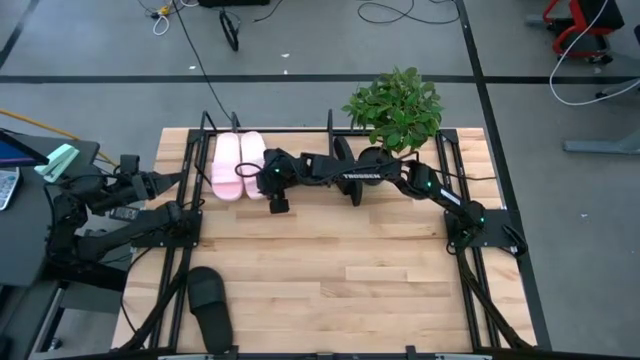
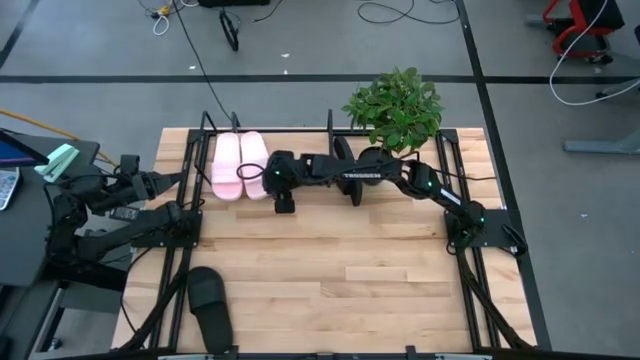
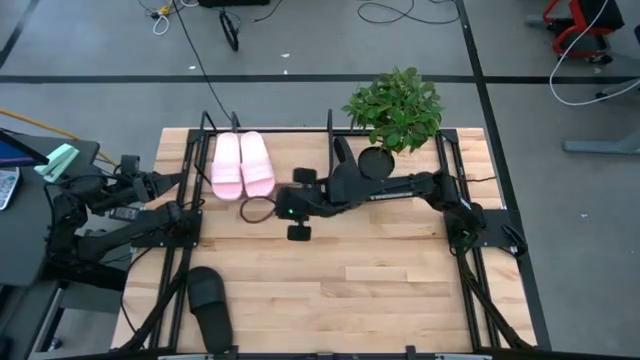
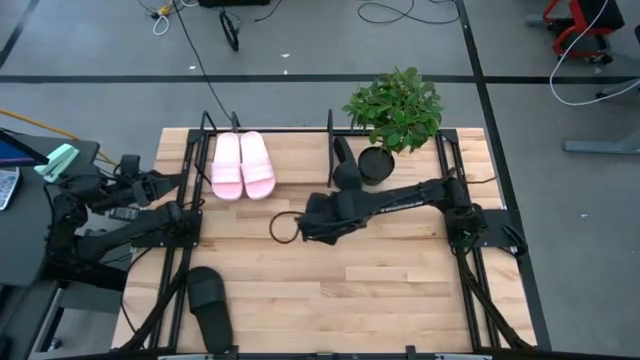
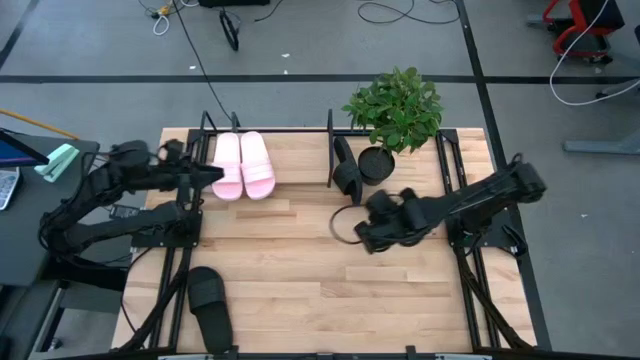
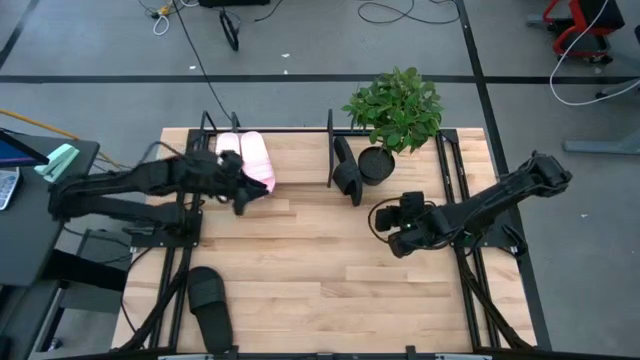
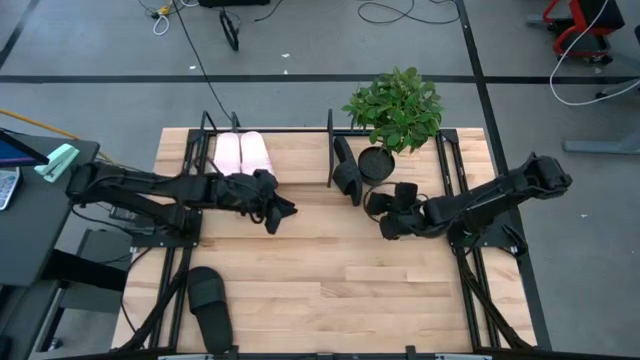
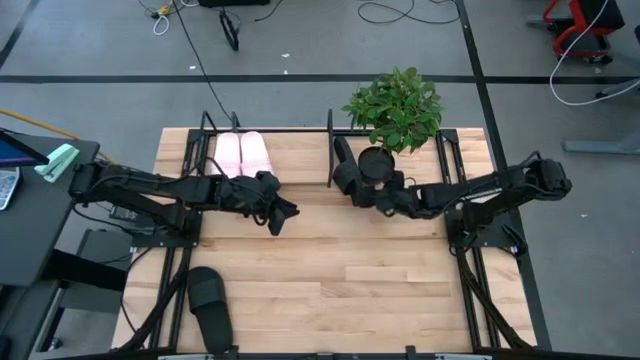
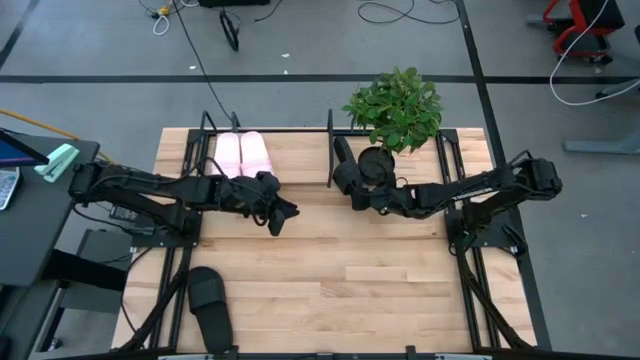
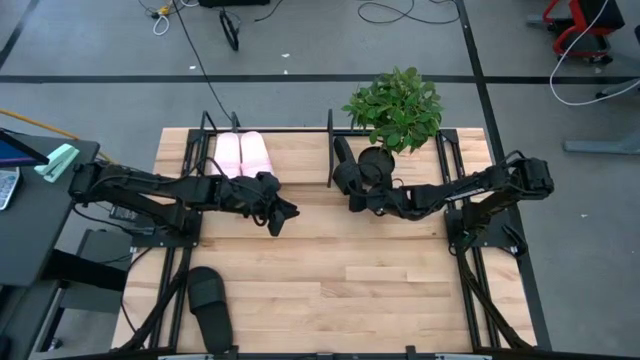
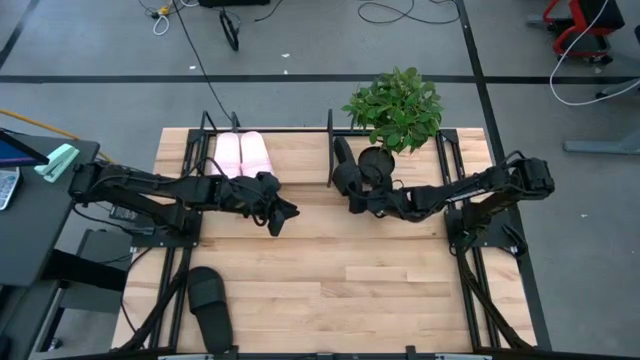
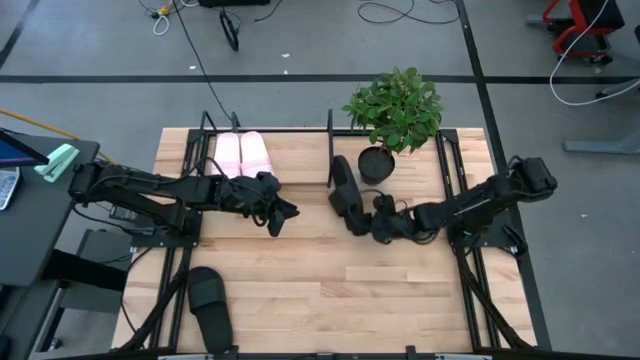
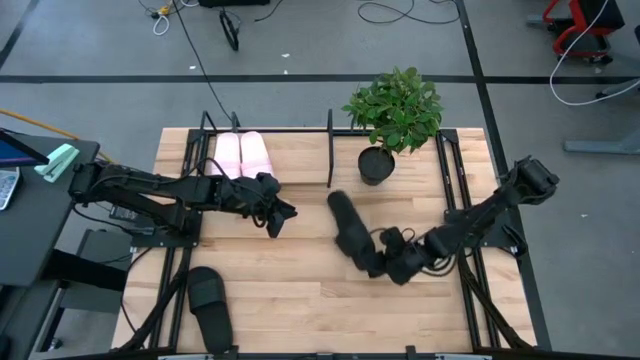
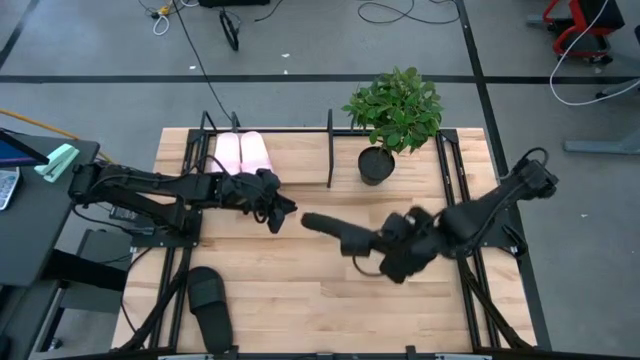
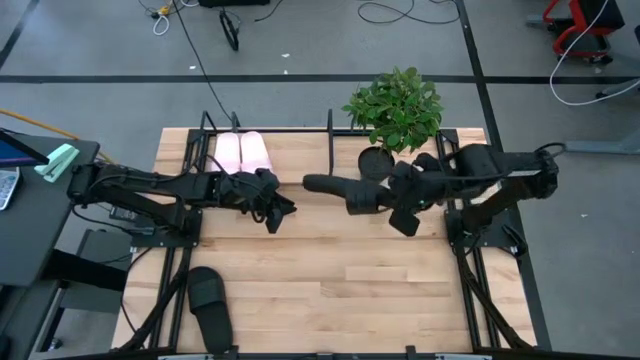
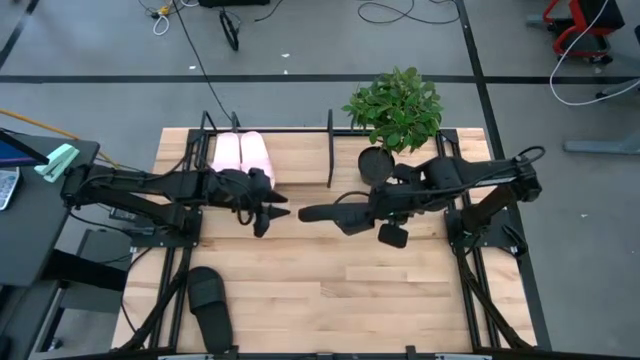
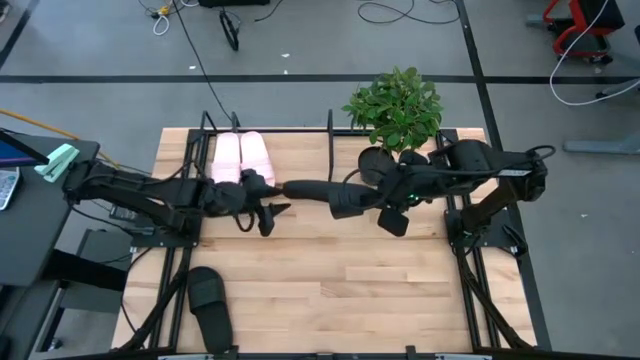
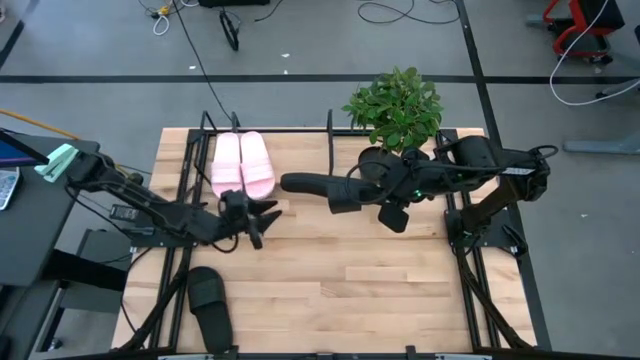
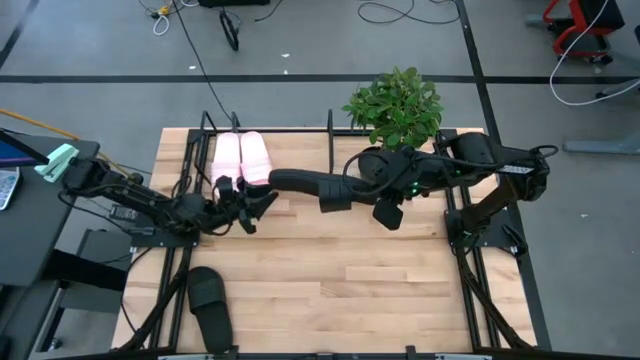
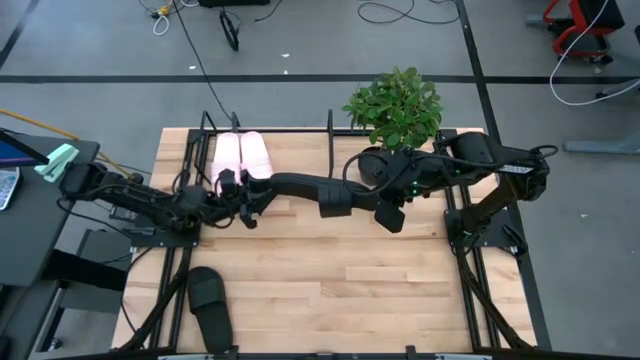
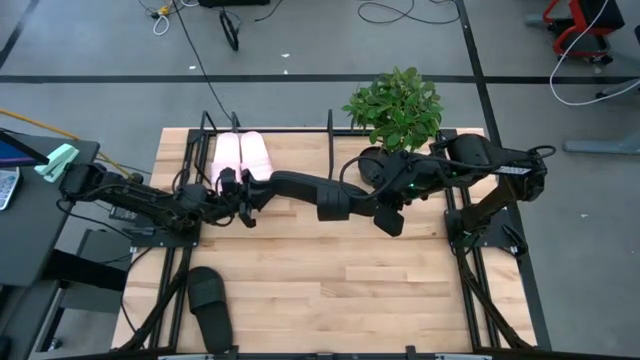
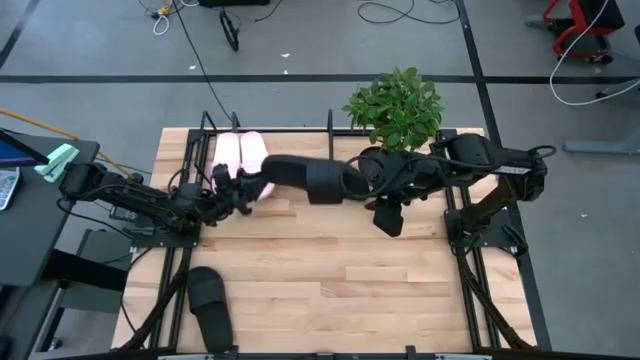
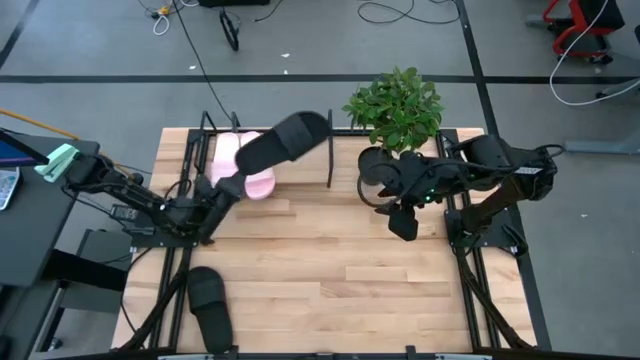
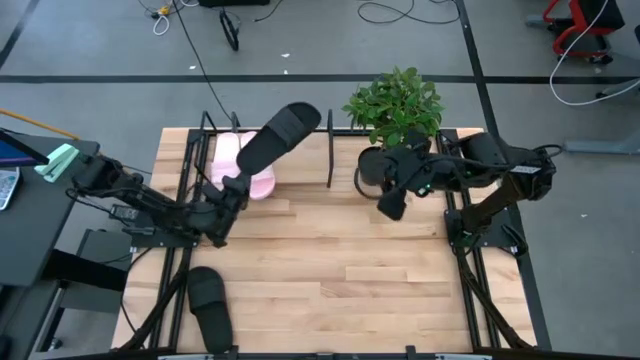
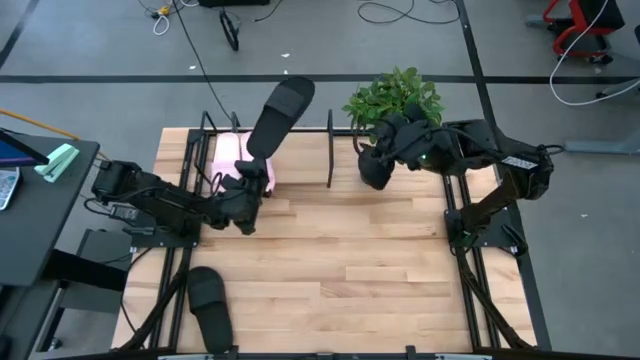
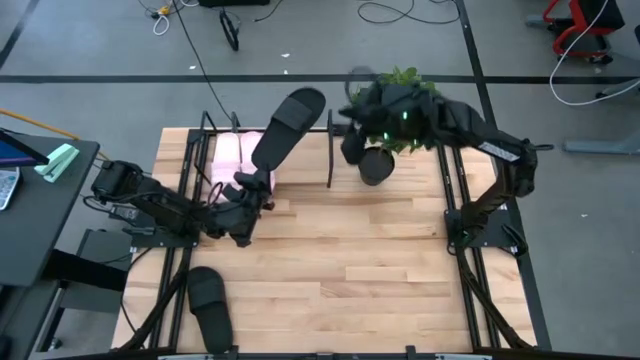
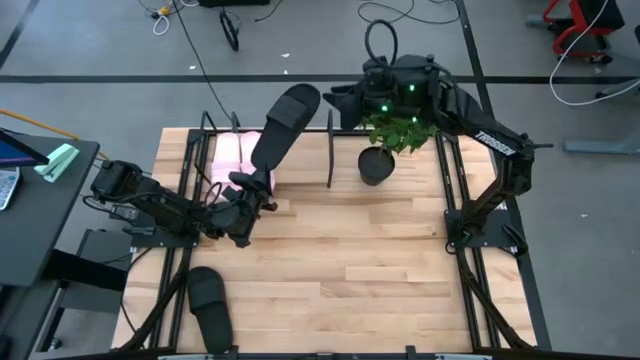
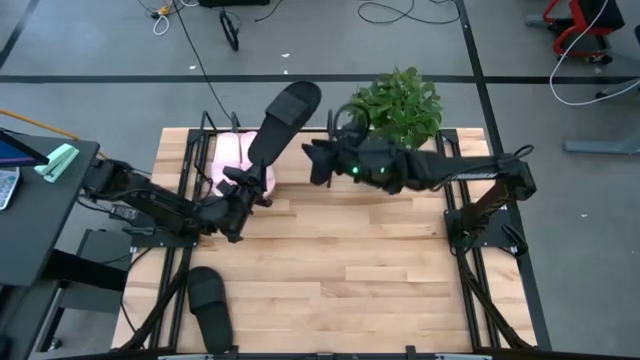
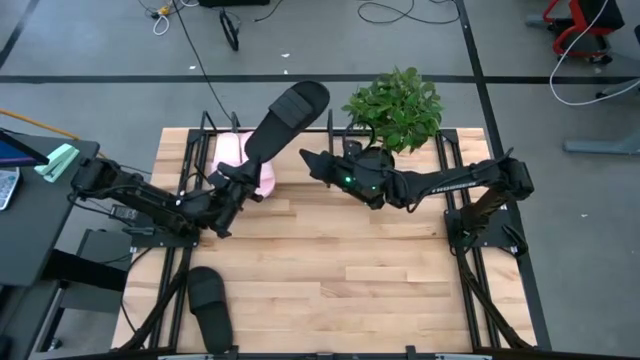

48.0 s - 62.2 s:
Task: Pick and place slides into the shelf
Put the top black slide on the shelf

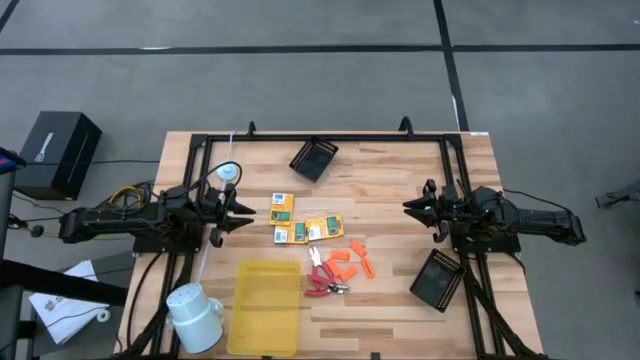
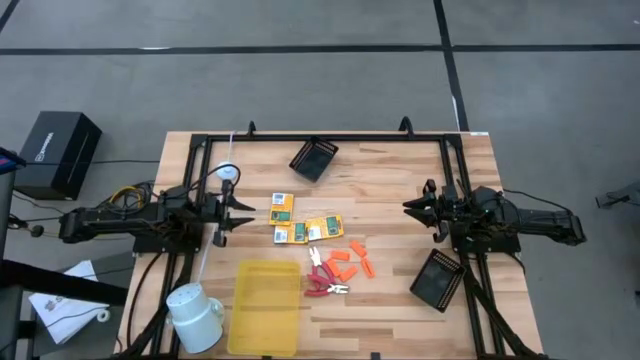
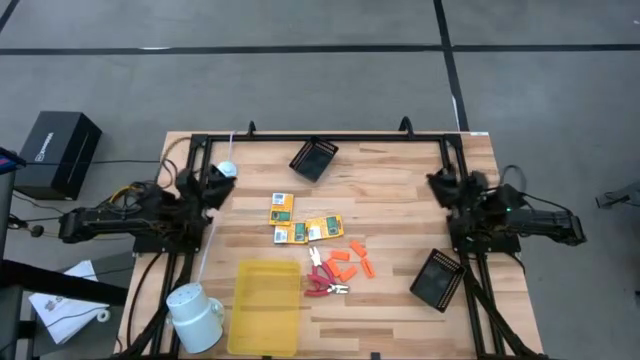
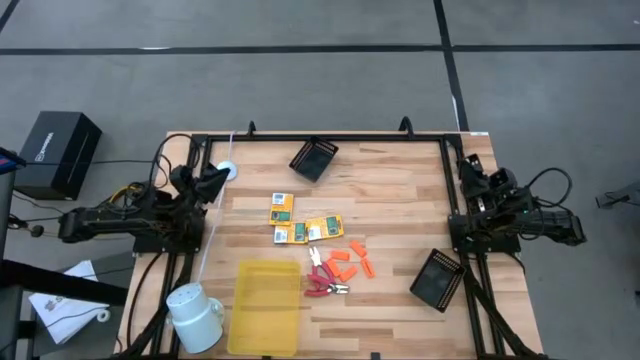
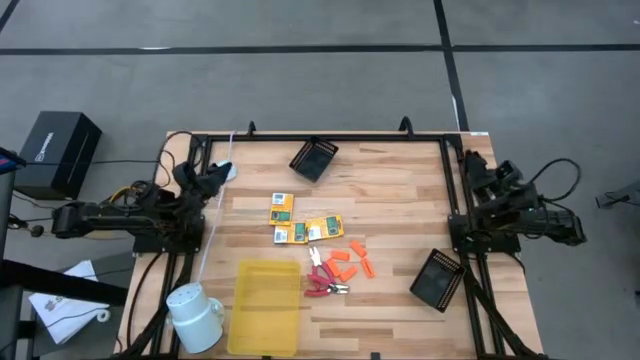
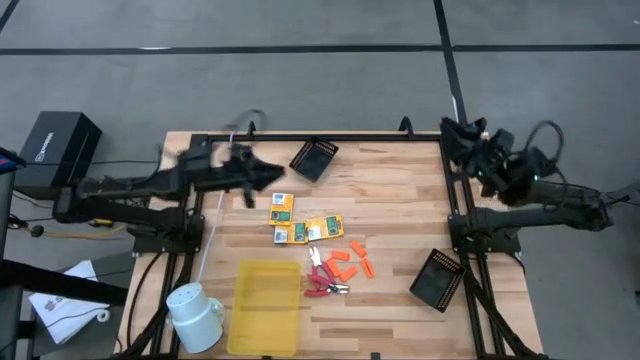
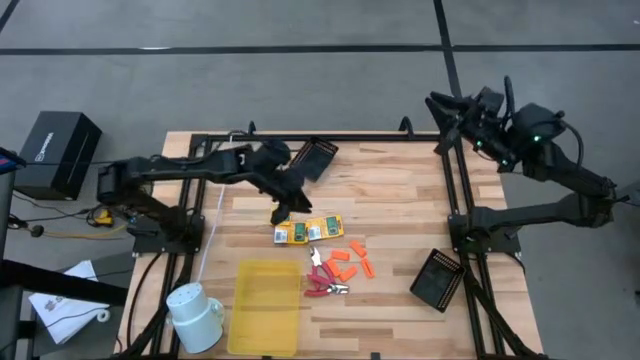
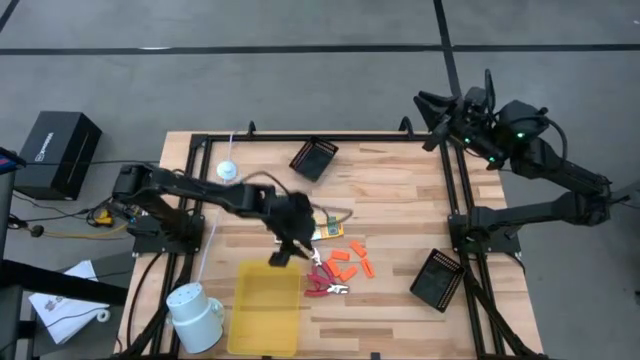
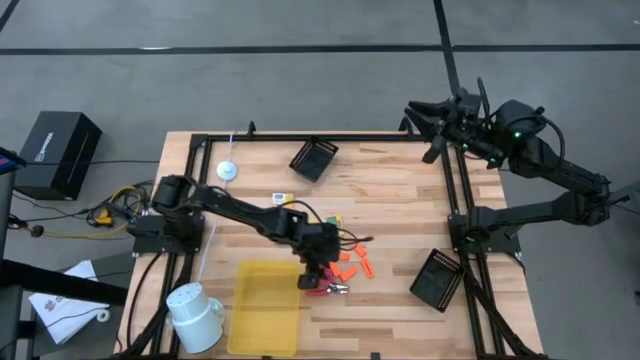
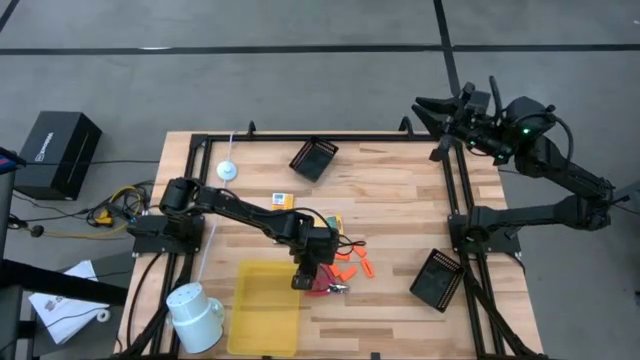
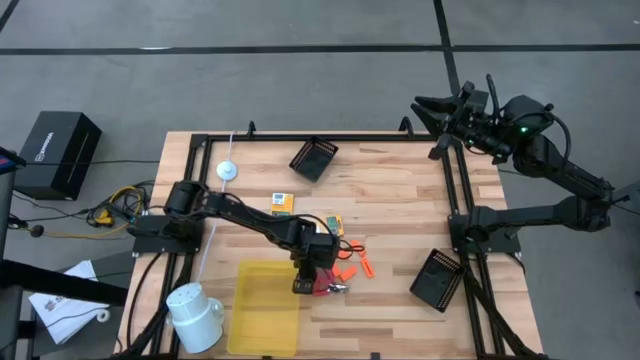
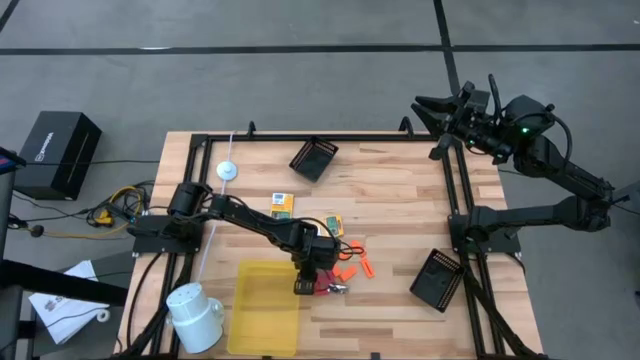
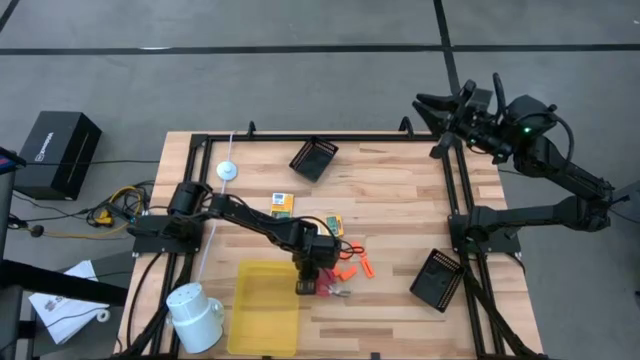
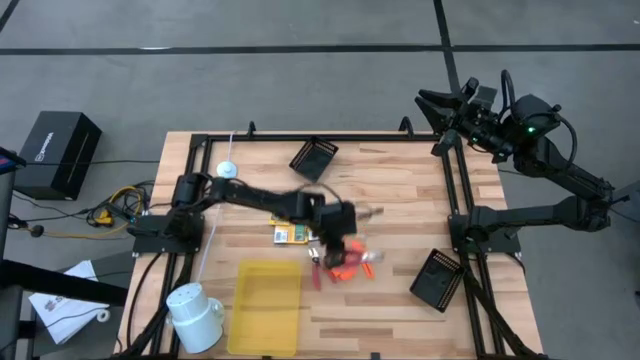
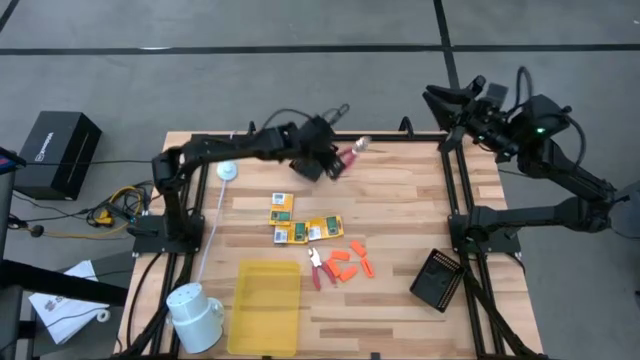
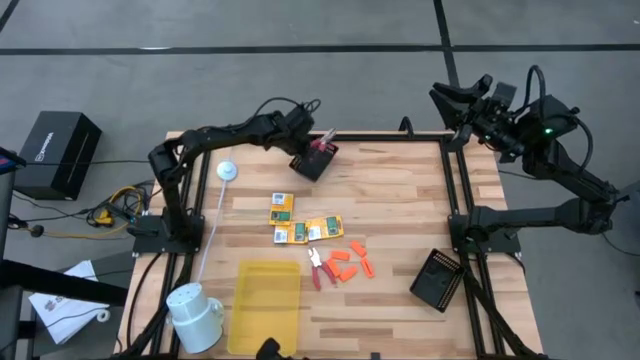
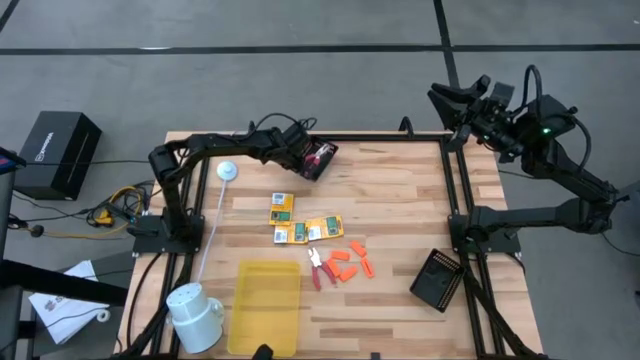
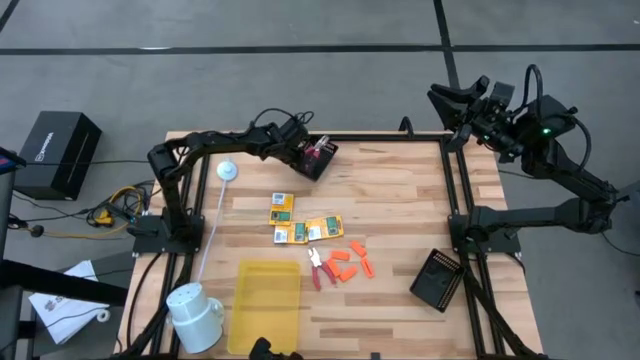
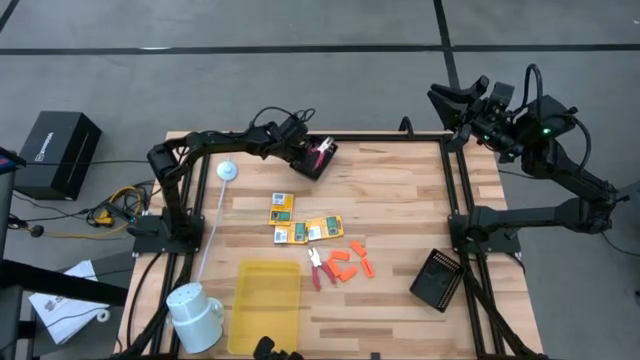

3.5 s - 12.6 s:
Task: Pick & Place School Supplies
Put the red puncher into the top black bin
